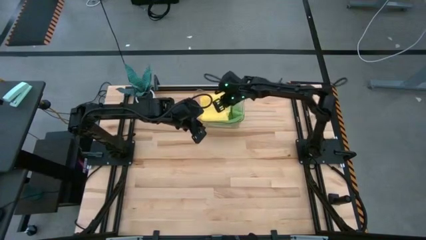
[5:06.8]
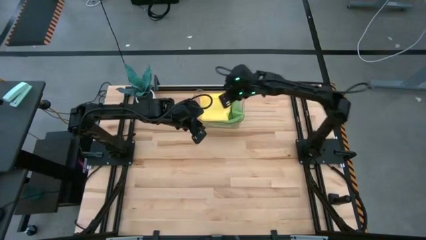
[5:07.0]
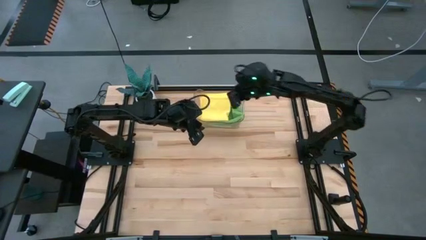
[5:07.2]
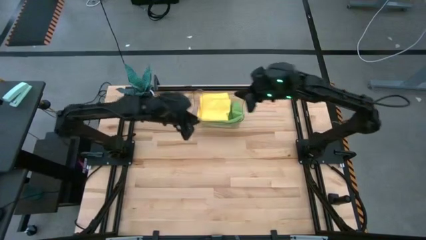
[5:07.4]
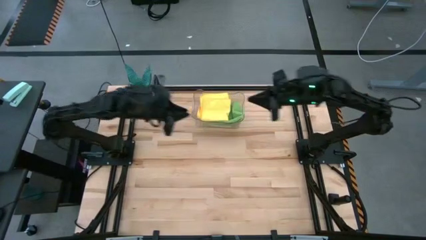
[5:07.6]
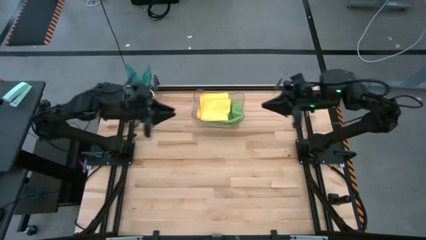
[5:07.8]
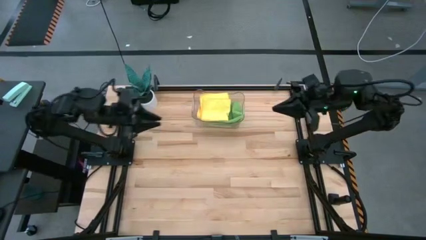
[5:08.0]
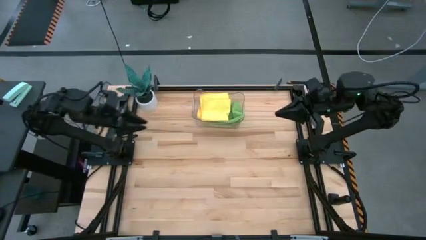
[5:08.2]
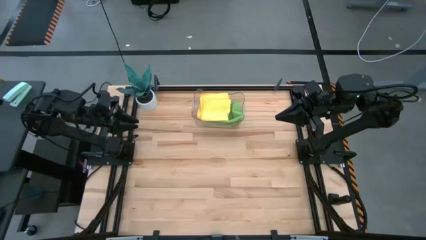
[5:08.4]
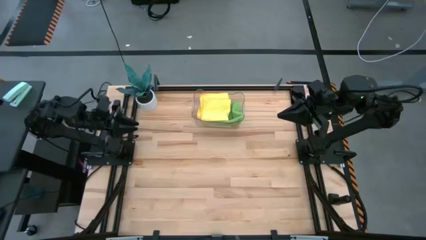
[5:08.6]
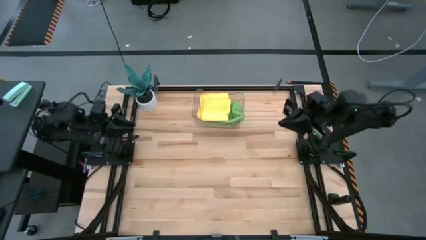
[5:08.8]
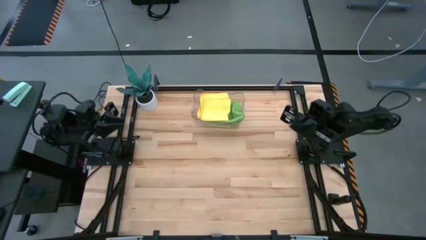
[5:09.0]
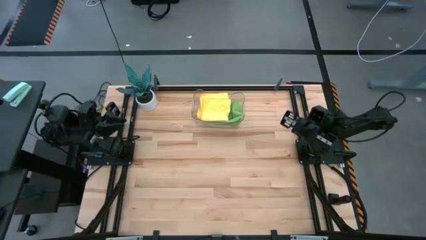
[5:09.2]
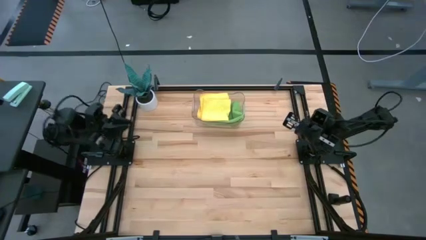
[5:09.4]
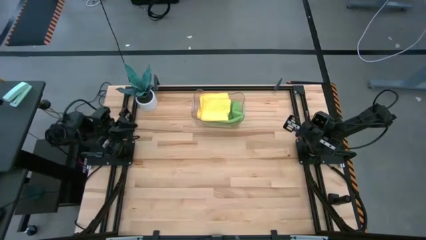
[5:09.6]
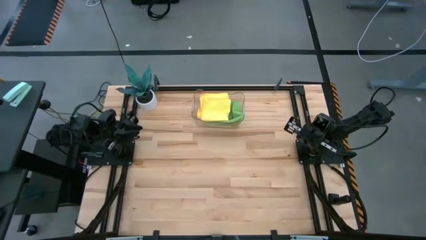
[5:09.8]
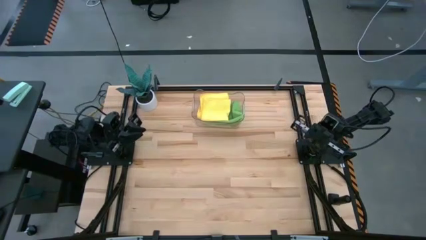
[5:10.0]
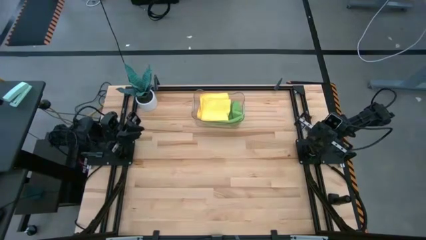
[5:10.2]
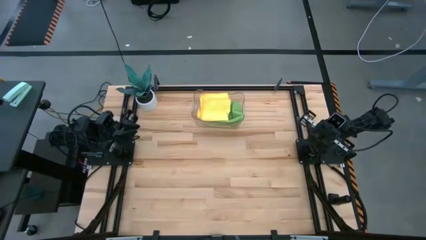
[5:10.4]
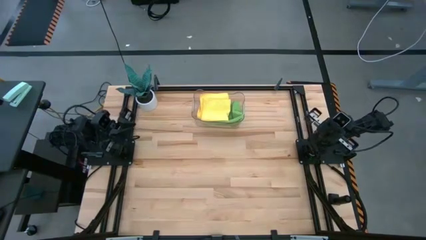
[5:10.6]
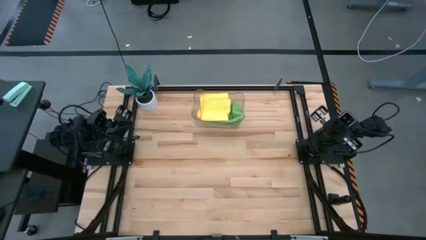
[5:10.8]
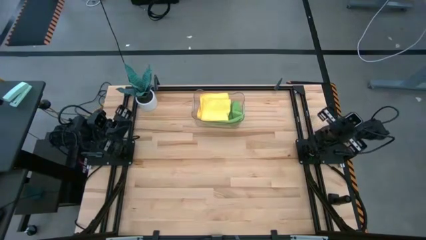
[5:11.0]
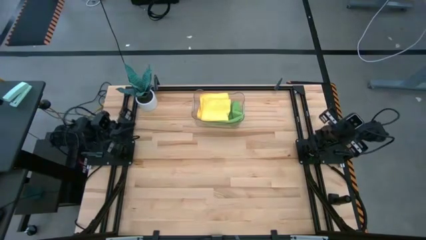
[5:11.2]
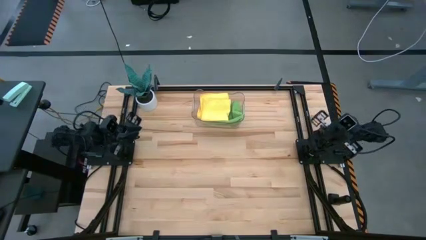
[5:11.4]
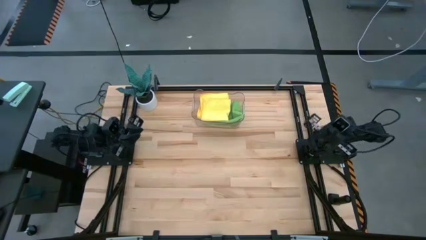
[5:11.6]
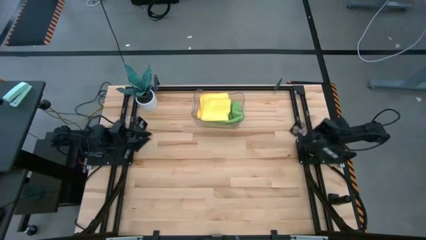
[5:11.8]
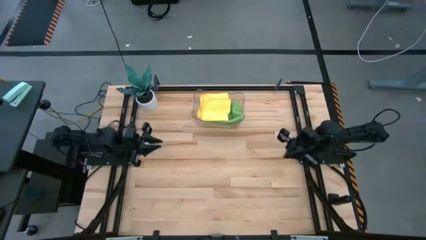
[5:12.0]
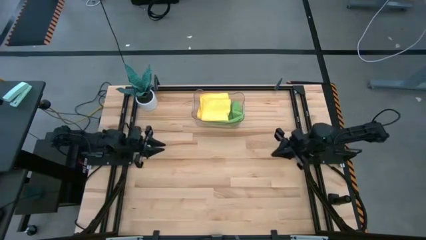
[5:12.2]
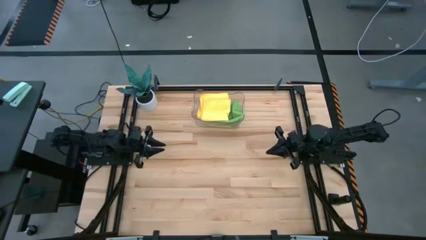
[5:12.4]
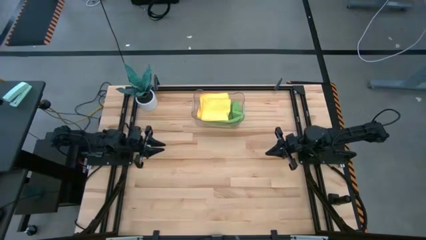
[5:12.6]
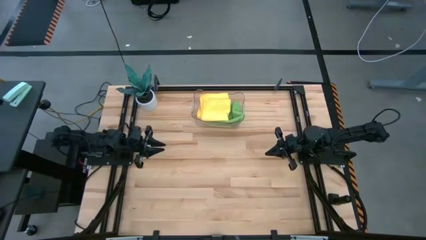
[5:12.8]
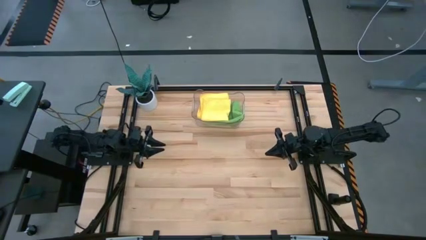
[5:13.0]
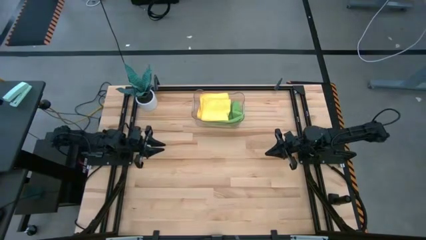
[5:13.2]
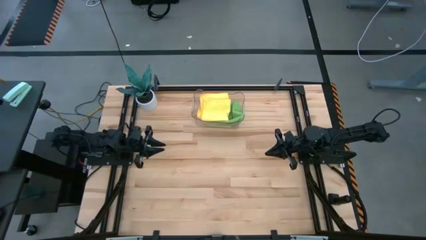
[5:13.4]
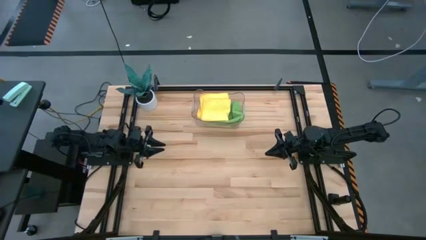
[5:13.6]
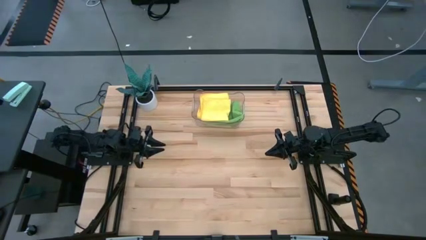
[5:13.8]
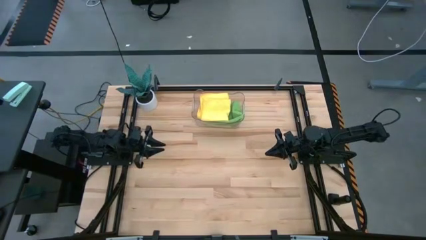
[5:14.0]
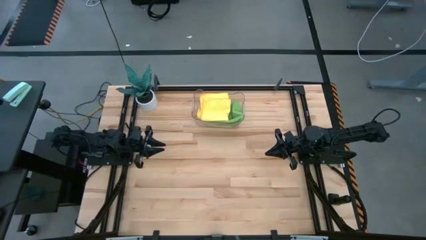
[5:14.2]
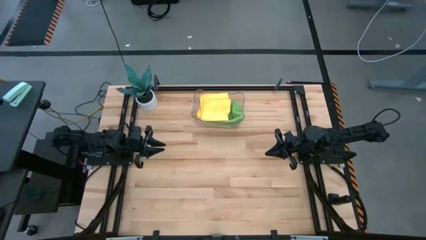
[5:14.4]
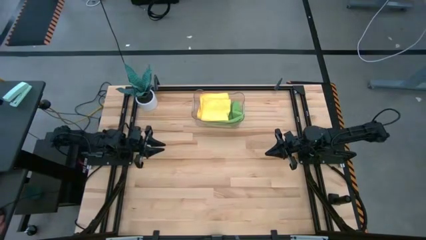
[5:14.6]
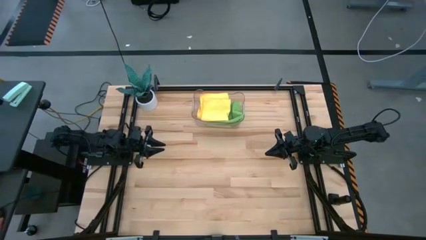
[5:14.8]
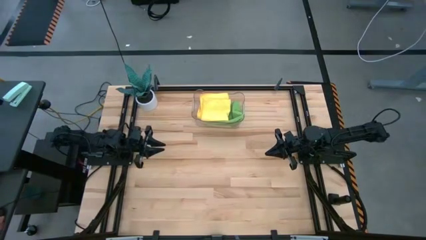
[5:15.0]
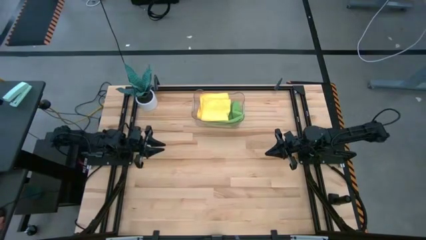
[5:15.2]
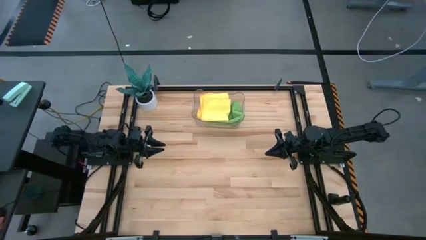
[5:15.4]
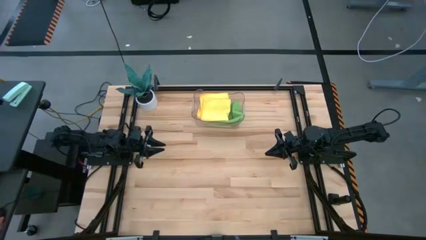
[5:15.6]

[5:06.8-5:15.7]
Task: Fold microfiber towels
Return to Home Position

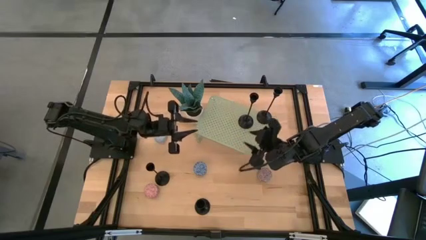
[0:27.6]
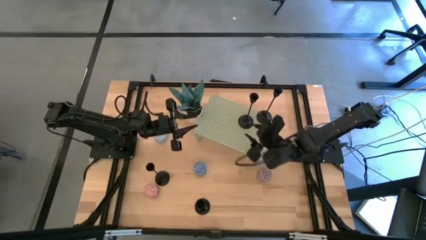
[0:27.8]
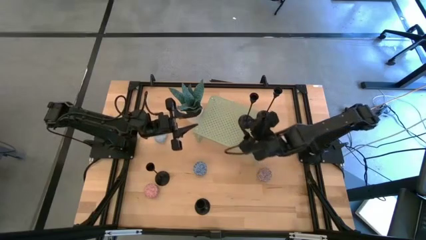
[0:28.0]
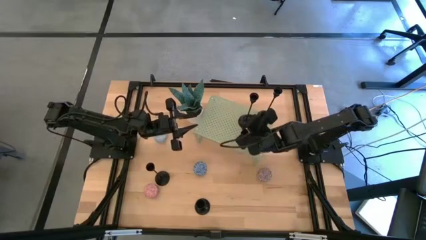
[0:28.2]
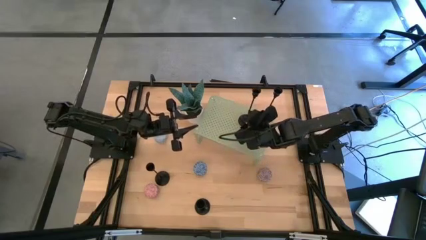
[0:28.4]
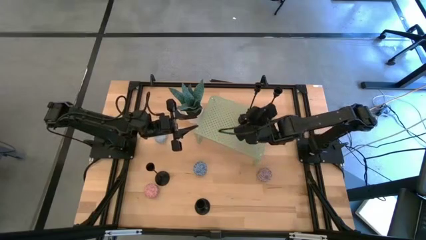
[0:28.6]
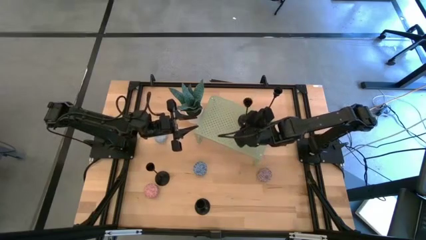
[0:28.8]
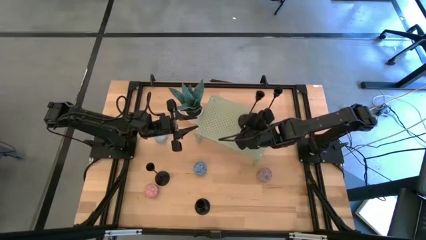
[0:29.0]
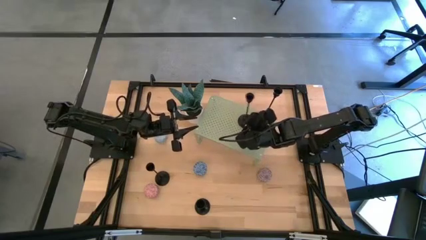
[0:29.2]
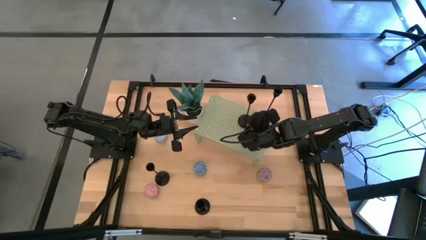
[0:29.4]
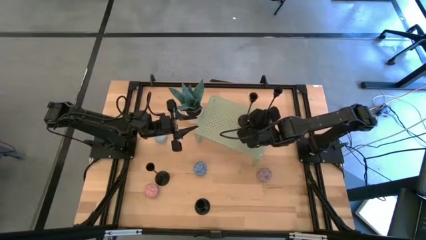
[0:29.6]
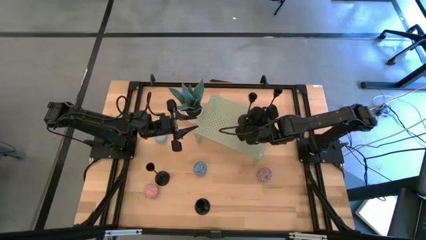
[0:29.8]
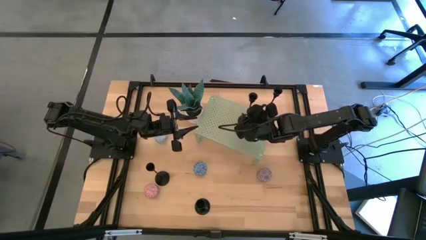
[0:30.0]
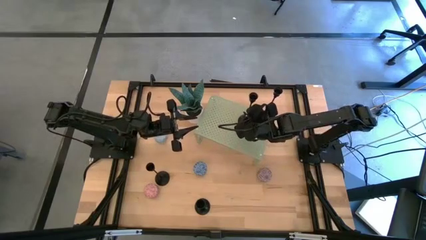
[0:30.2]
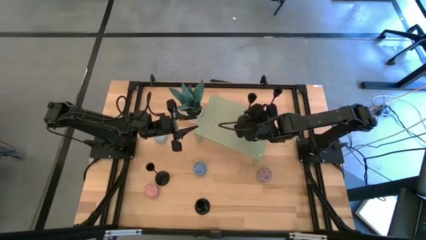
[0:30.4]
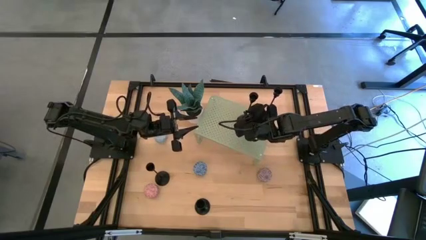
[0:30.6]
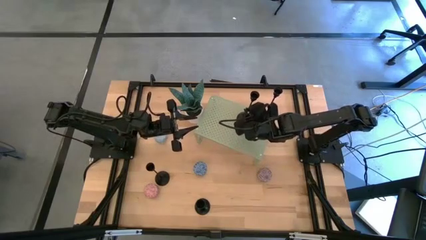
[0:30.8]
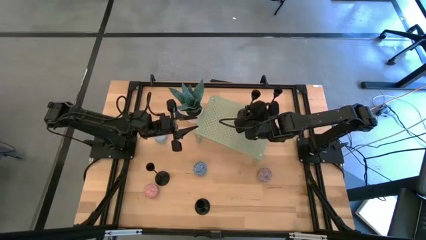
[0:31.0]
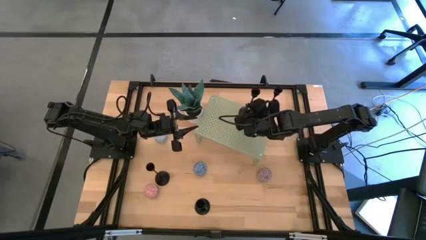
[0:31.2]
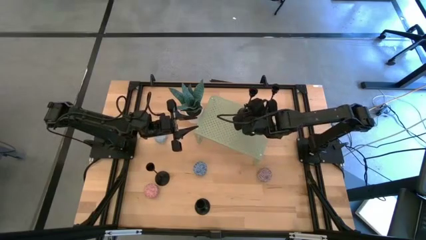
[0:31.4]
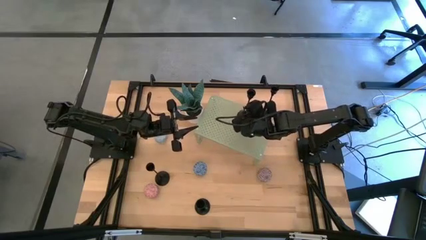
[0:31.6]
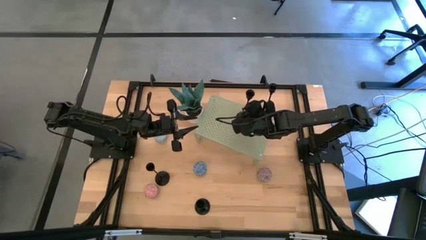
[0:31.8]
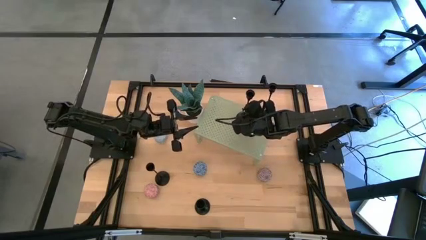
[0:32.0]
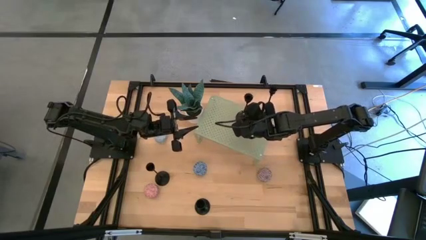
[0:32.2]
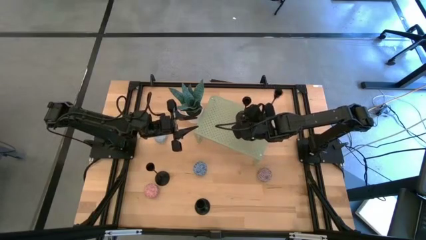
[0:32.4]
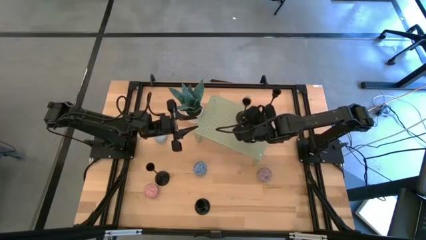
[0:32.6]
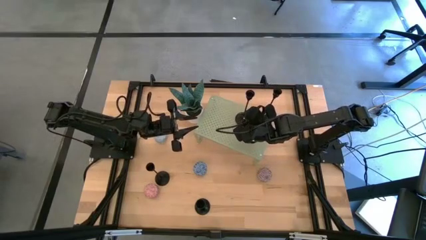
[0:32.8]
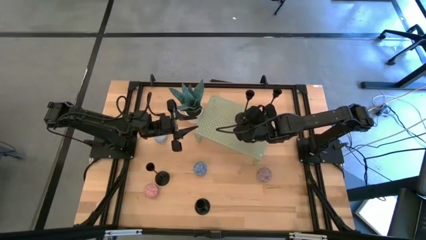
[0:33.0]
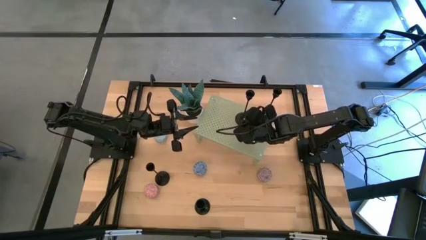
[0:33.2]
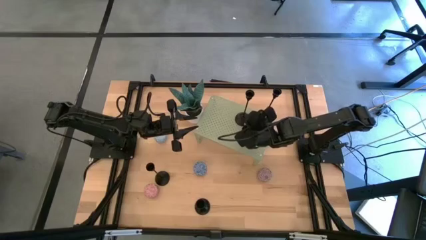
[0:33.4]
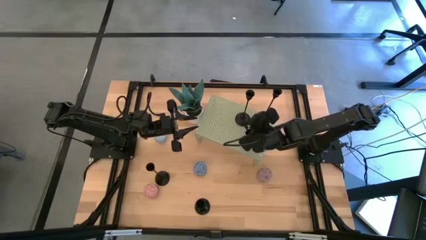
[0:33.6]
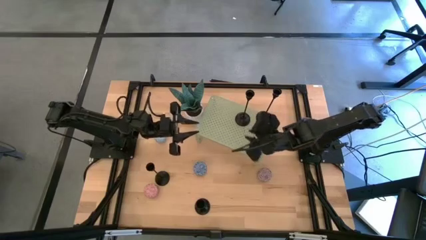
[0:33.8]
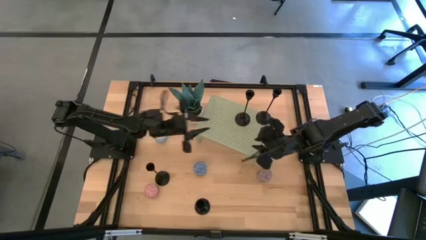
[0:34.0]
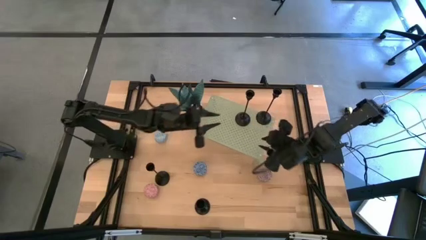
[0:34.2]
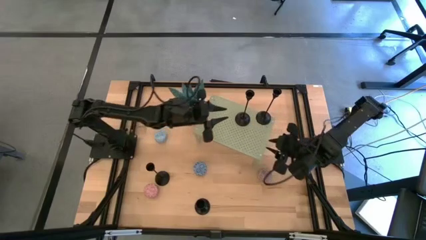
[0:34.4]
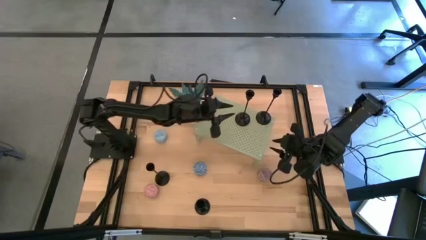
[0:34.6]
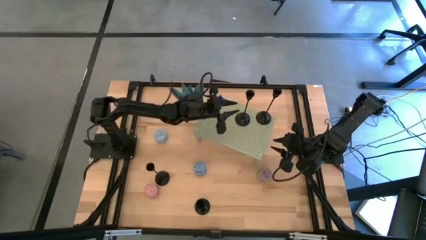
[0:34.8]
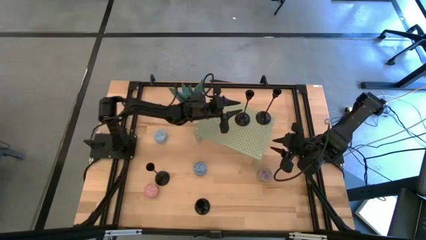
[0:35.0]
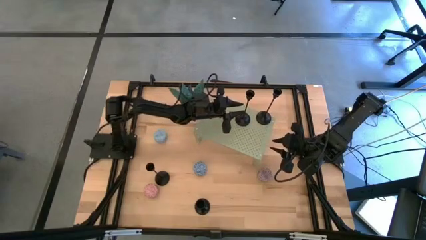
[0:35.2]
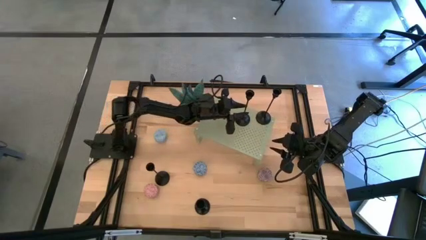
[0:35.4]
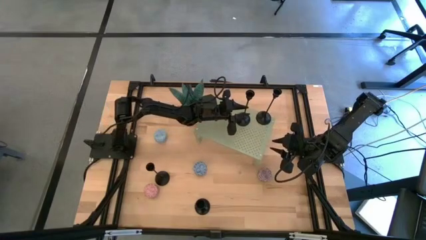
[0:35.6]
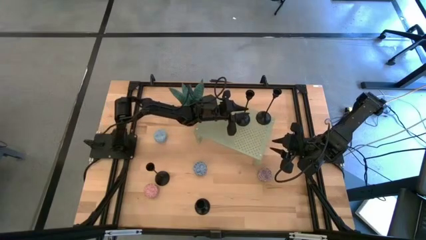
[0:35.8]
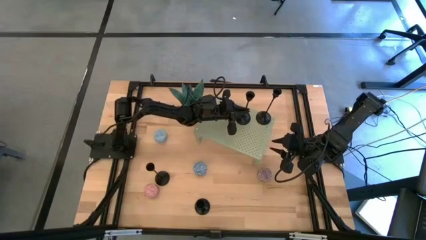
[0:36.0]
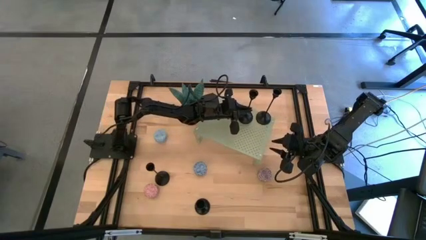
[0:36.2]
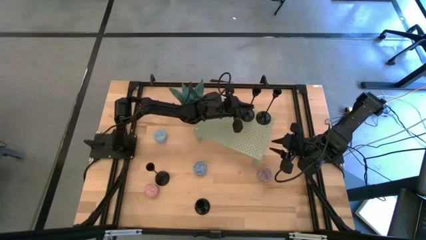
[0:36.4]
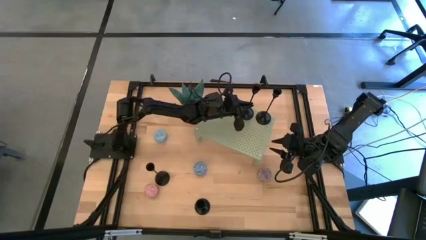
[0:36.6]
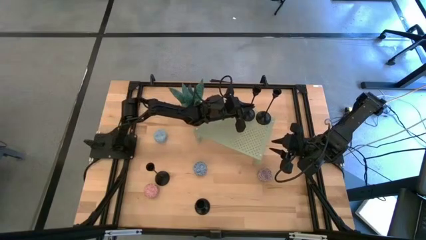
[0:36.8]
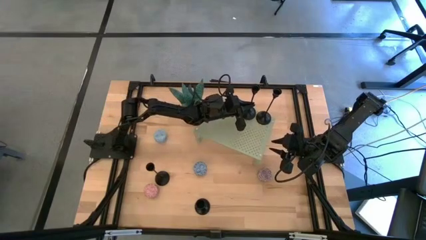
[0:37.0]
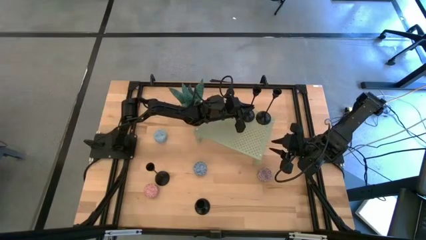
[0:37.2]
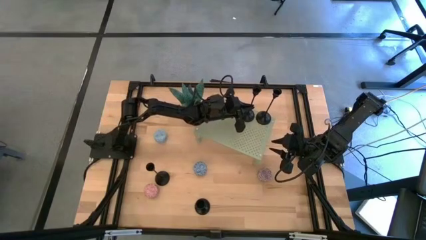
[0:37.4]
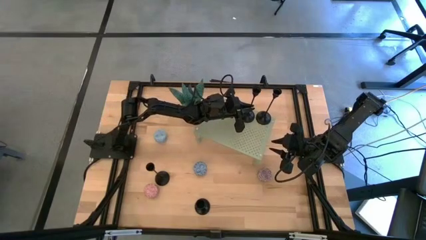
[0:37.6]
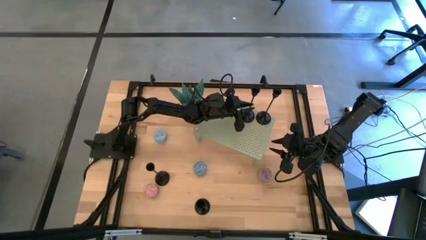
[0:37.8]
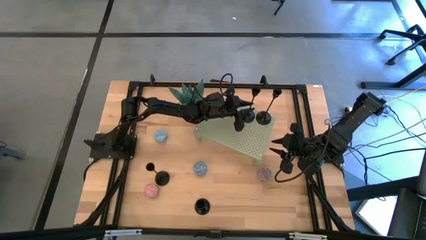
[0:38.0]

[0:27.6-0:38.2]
Task: Stock candles and holders on shelf
Align the black candle holder with the other black candle holder on the shelf
